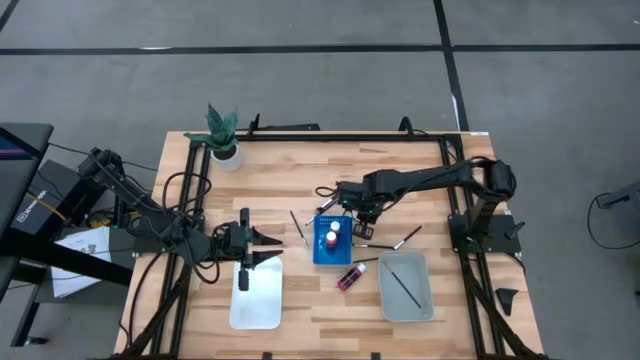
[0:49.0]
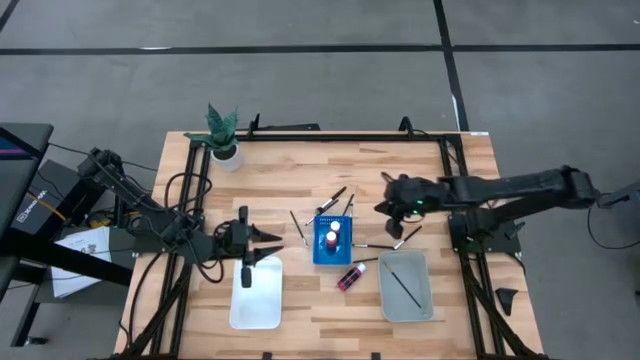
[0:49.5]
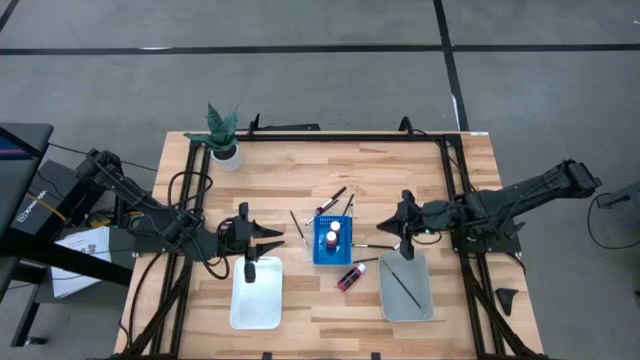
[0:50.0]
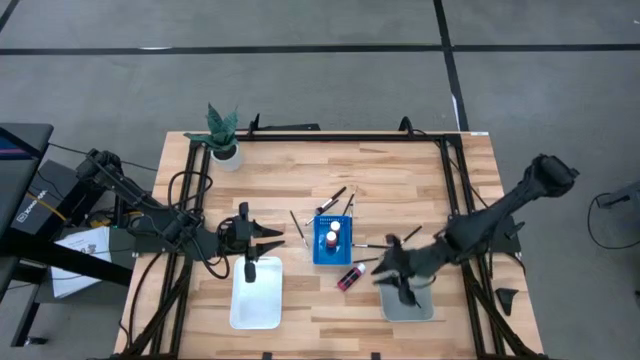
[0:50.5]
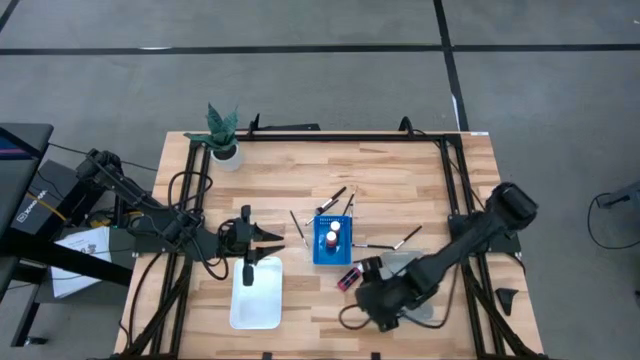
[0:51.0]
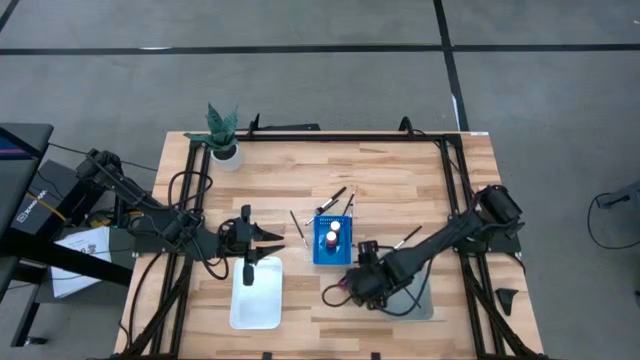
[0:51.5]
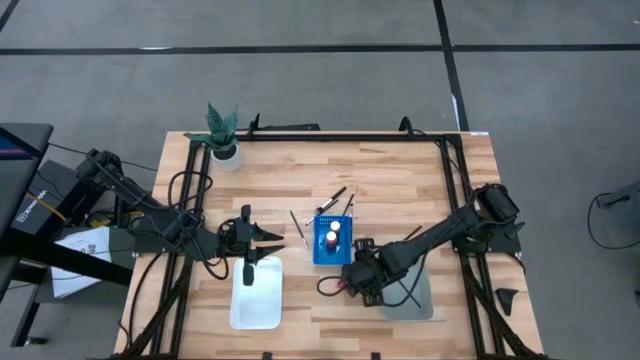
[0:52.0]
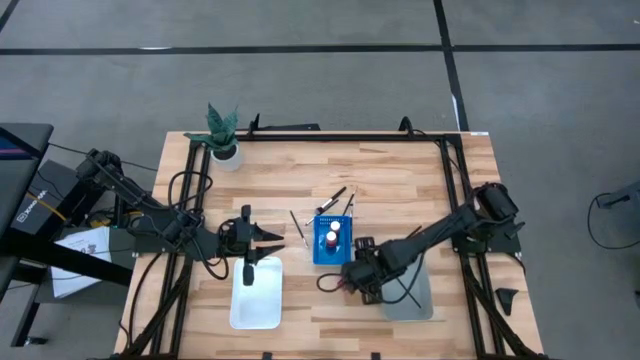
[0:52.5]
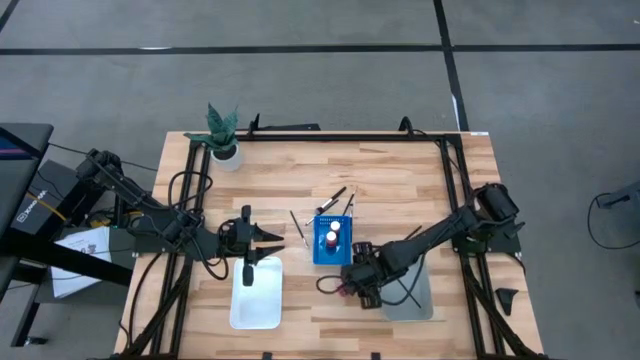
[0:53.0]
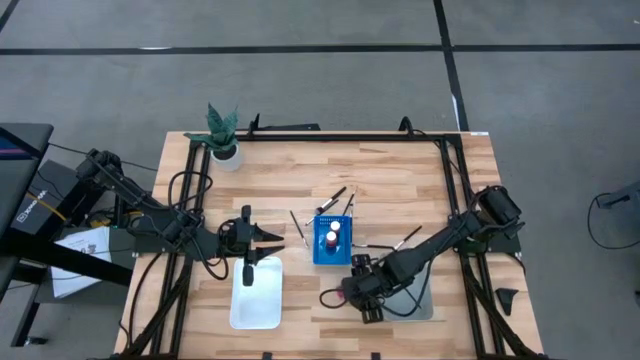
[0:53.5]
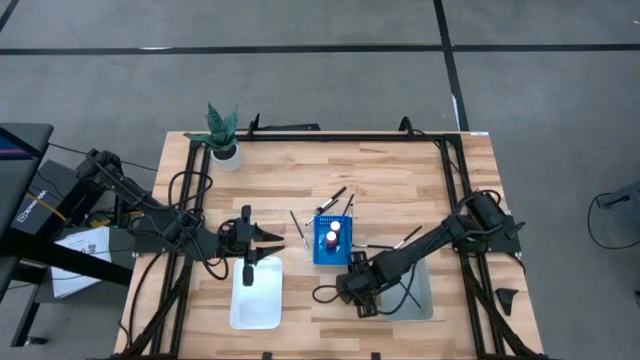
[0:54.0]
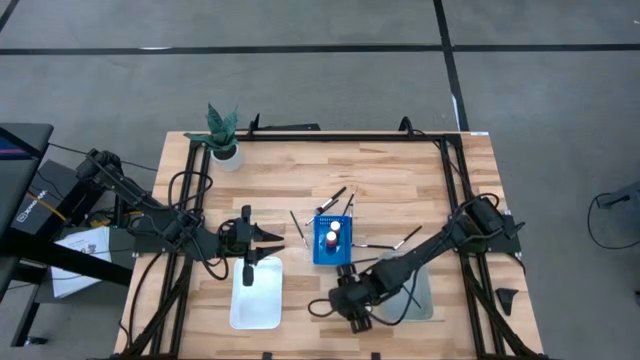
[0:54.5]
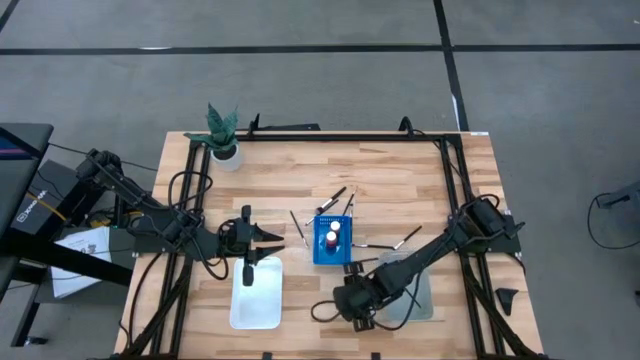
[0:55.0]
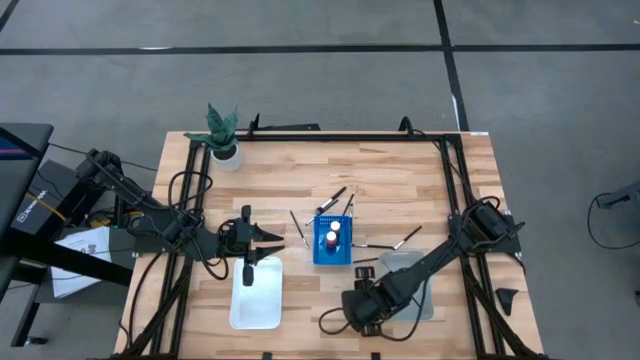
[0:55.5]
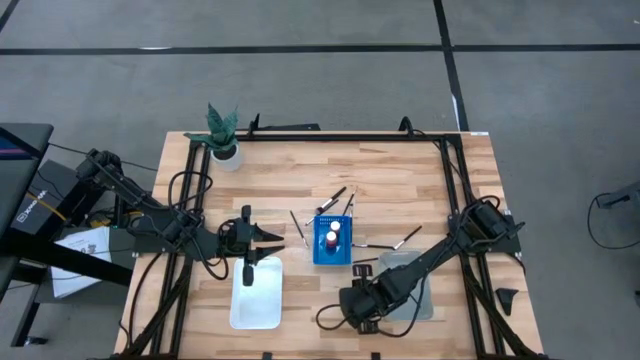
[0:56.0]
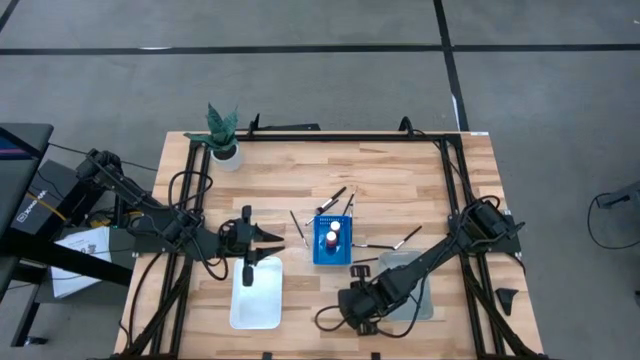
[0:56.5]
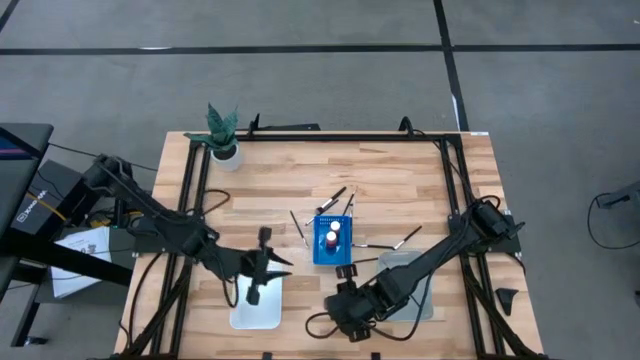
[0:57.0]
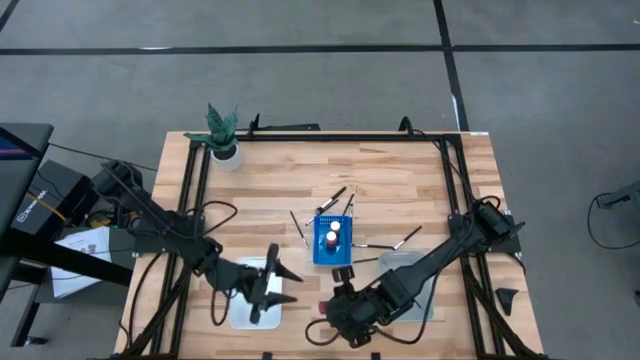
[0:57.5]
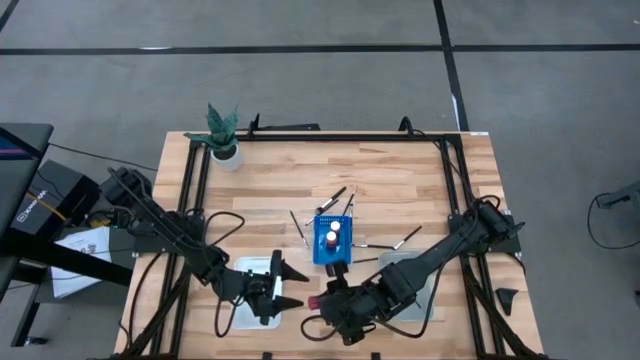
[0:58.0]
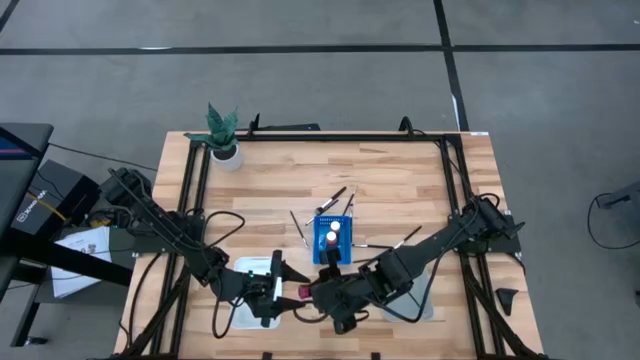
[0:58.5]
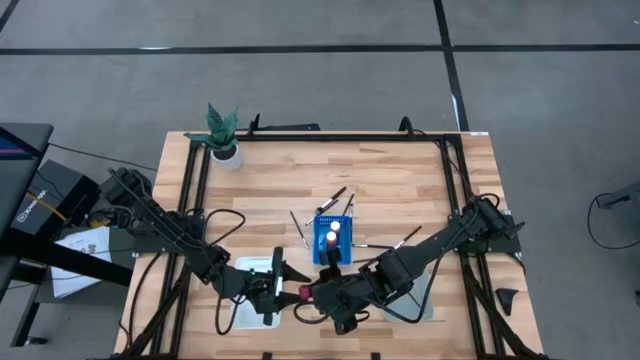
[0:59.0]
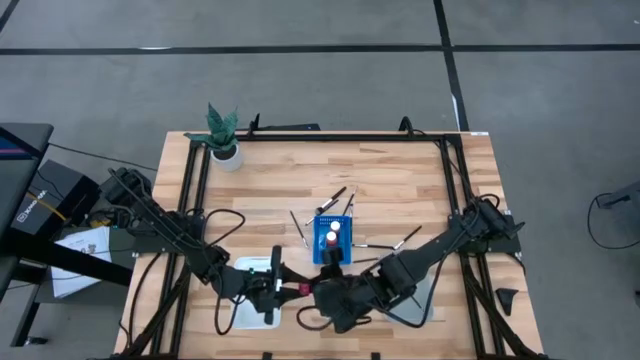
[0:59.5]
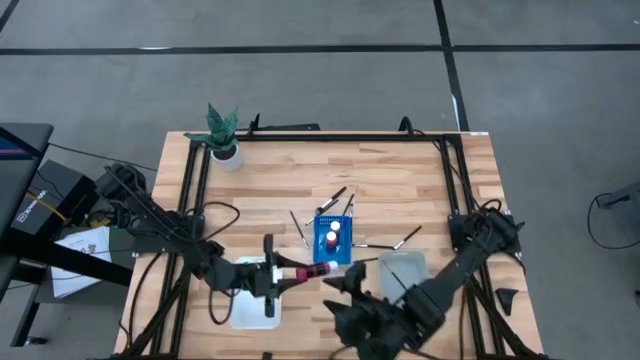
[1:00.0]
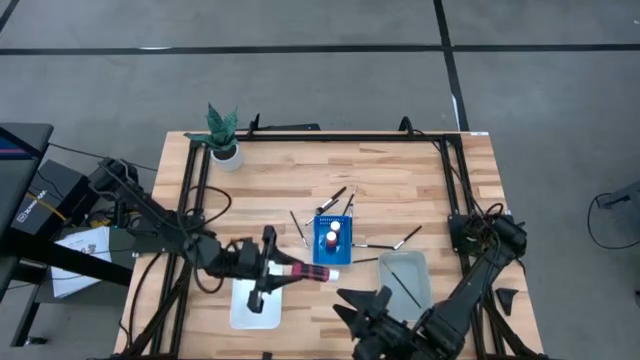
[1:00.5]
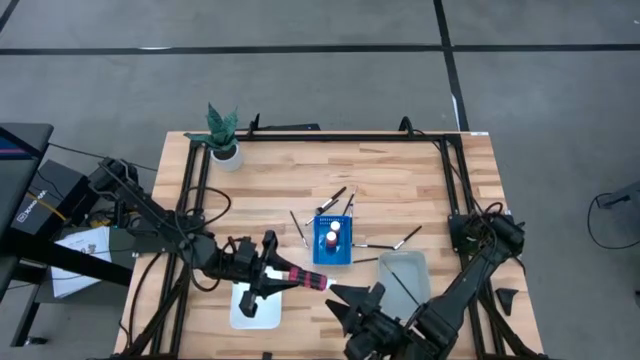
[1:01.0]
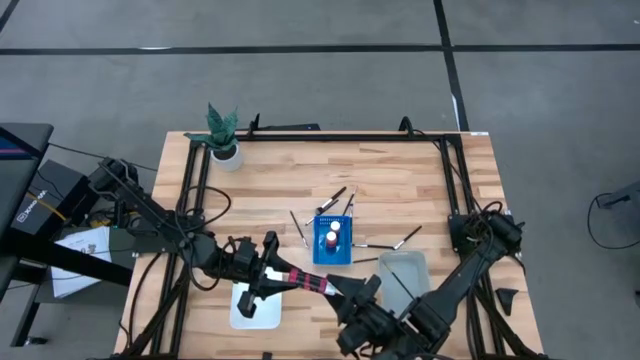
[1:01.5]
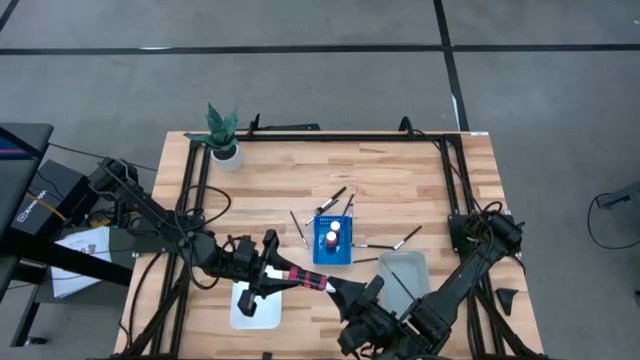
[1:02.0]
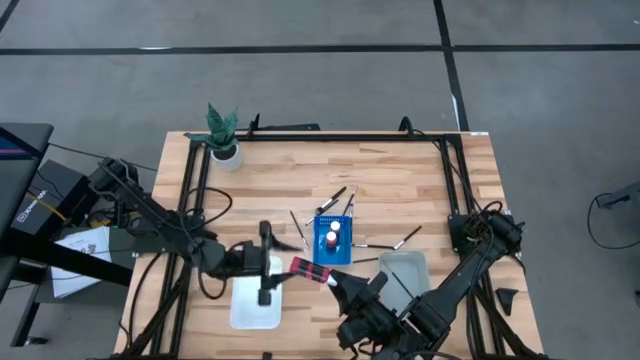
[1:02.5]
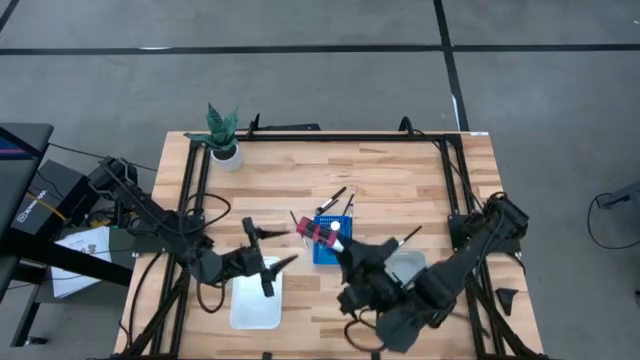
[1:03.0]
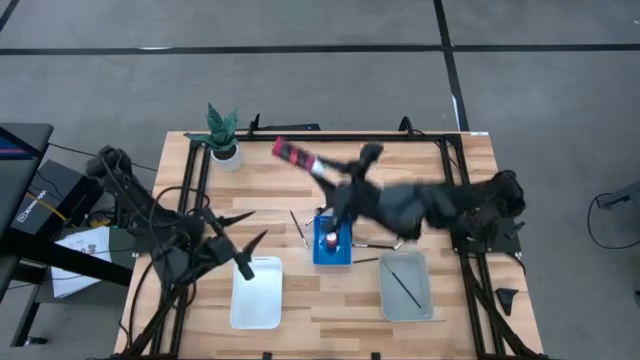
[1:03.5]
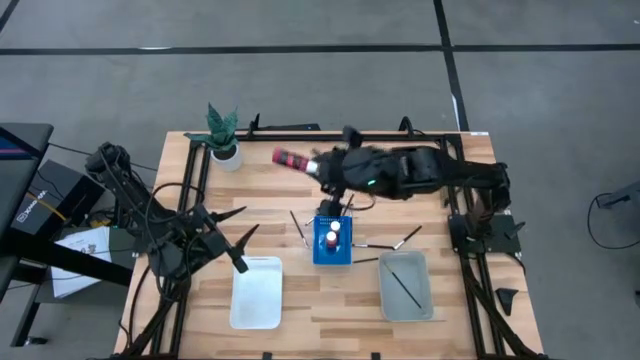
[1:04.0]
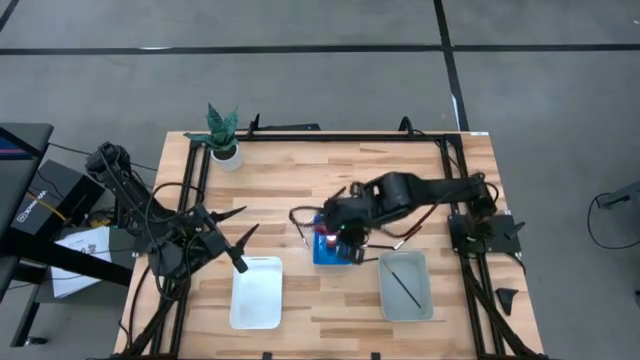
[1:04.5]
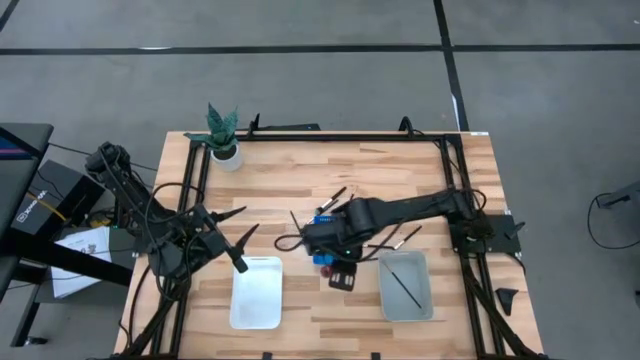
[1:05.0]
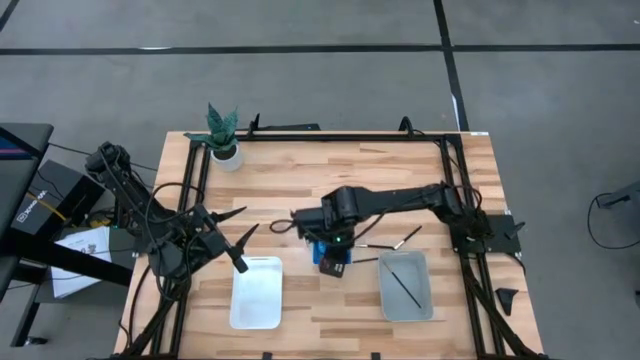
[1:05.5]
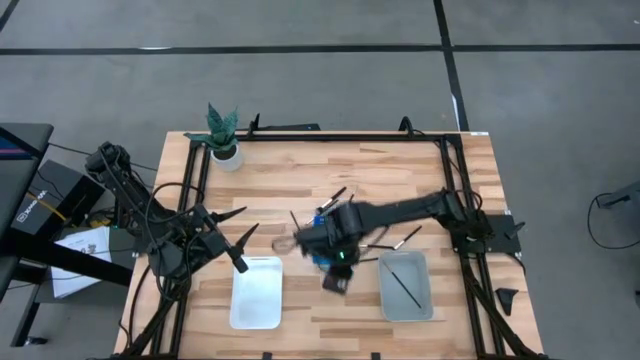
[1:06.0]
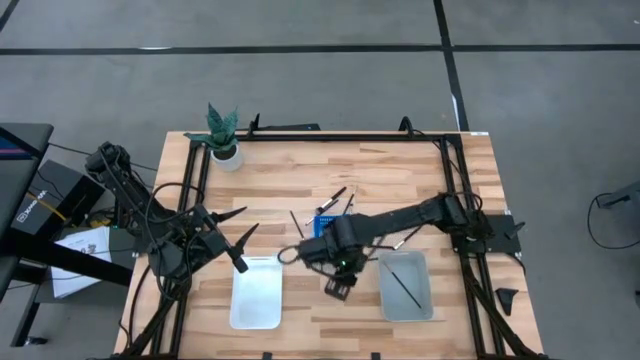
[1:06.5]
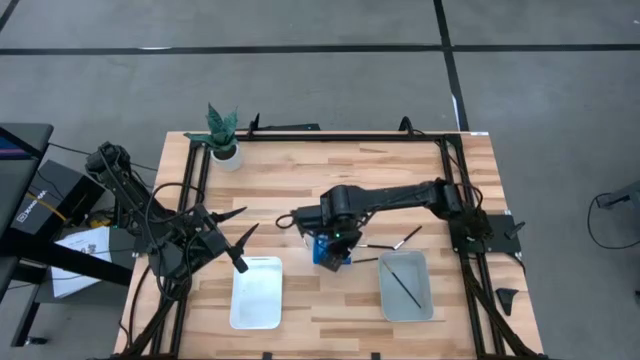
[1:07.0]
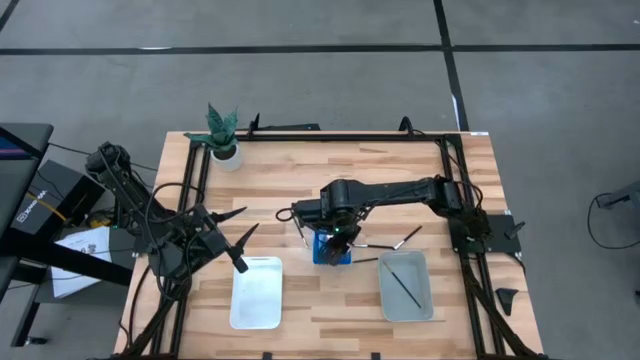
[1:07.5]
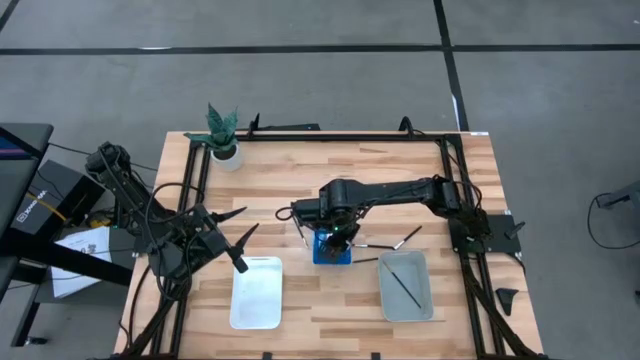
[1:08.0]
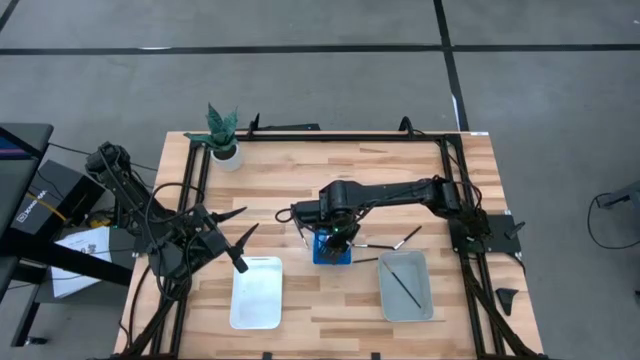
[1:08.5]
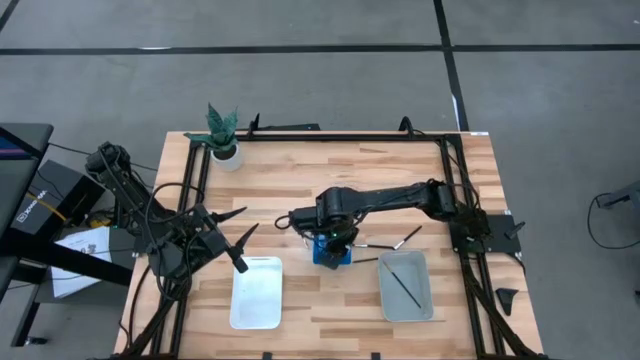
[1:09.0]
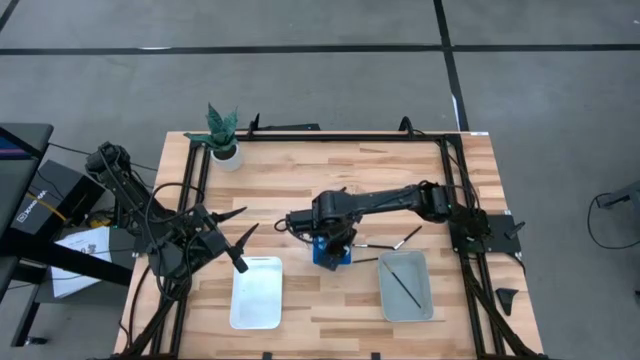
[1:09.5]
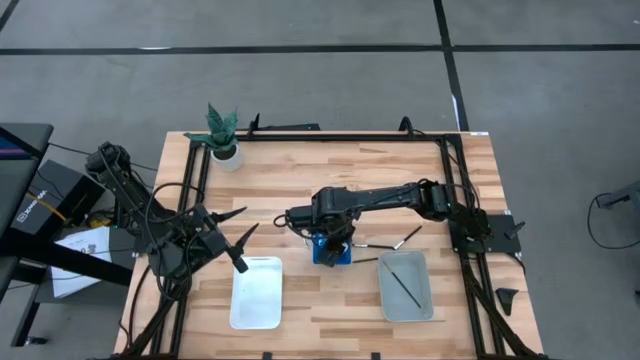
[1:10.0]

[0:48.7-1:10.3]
Task: Pick & Place Paint Supplies
Put the pink paint bottle into the blue bin
